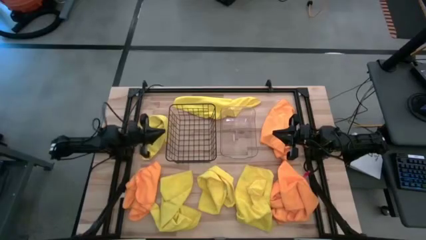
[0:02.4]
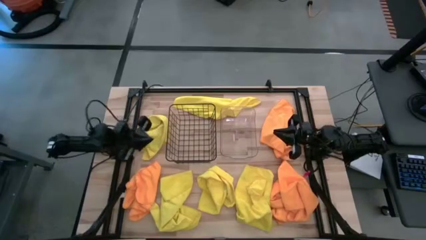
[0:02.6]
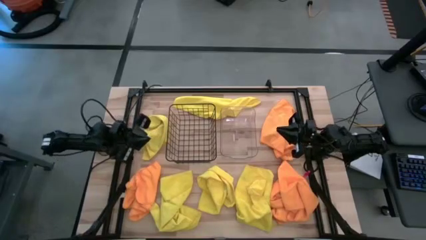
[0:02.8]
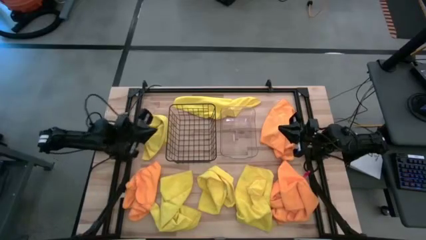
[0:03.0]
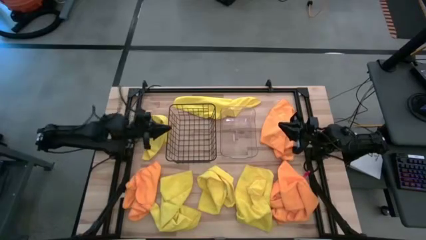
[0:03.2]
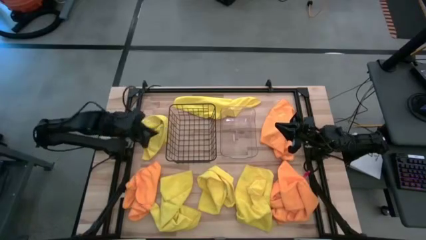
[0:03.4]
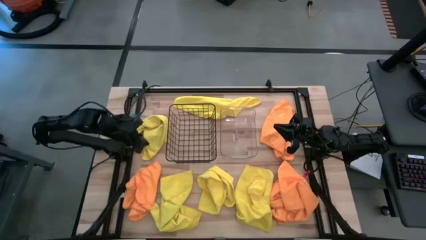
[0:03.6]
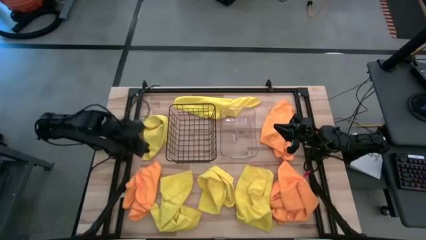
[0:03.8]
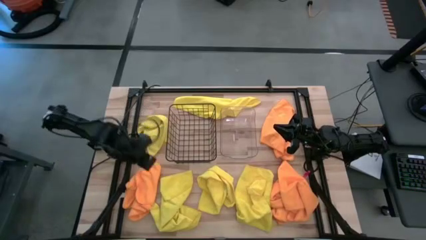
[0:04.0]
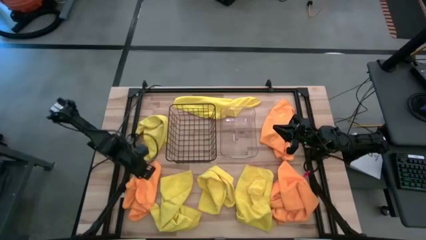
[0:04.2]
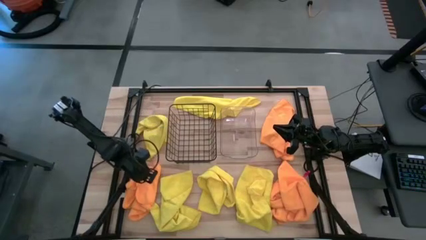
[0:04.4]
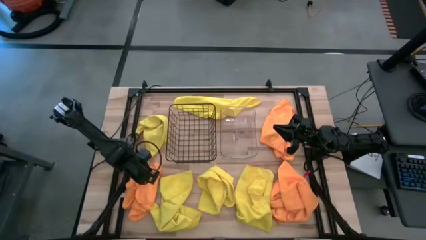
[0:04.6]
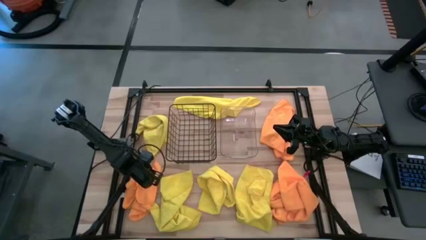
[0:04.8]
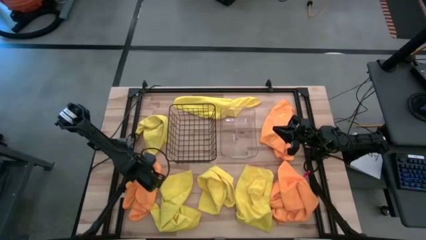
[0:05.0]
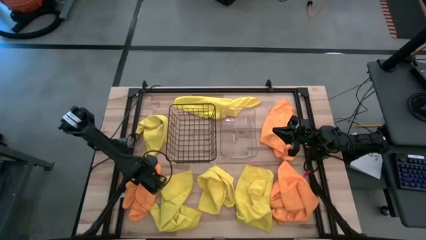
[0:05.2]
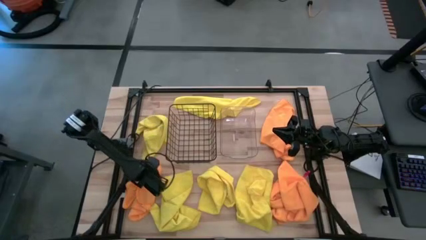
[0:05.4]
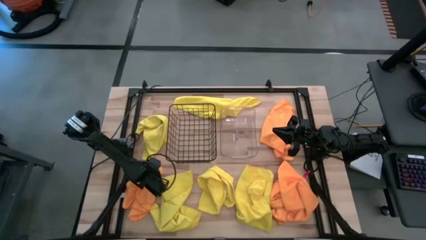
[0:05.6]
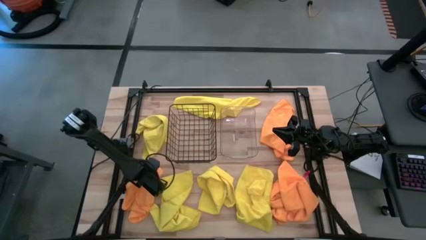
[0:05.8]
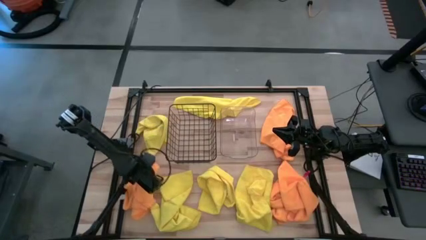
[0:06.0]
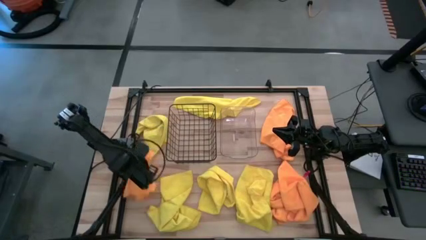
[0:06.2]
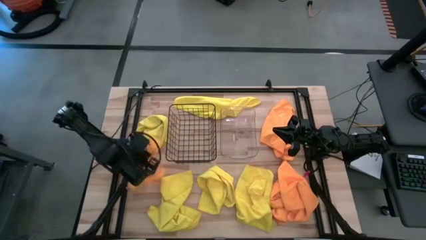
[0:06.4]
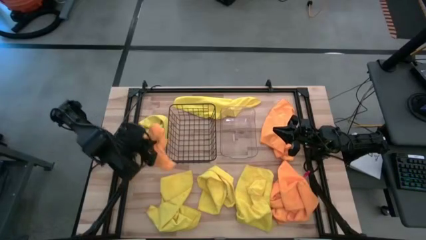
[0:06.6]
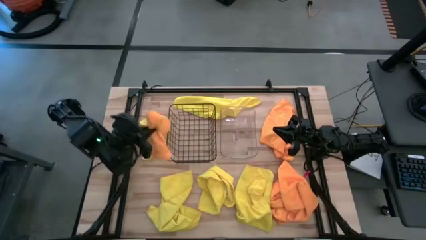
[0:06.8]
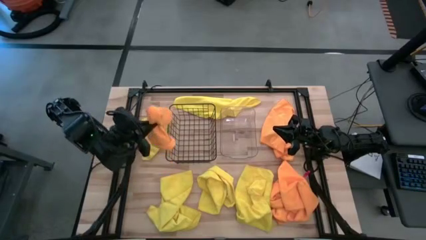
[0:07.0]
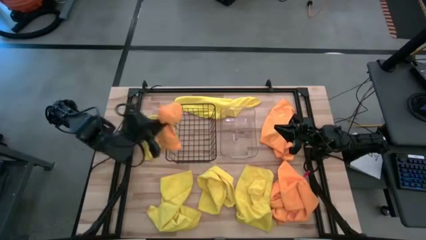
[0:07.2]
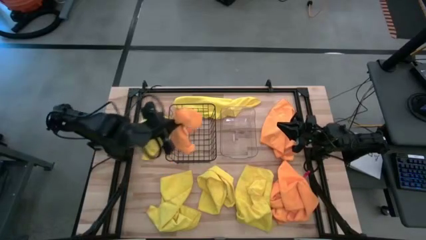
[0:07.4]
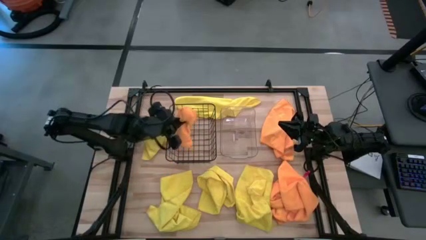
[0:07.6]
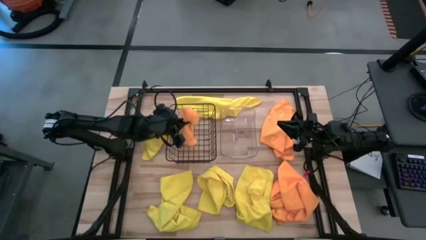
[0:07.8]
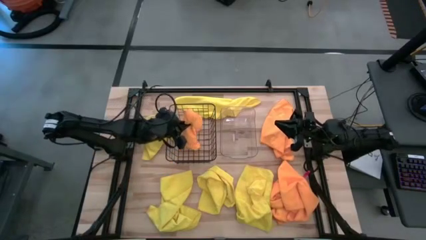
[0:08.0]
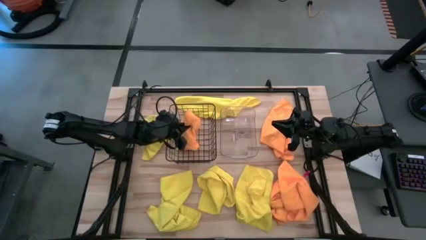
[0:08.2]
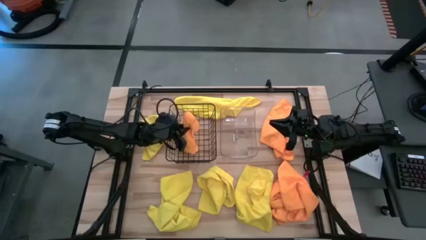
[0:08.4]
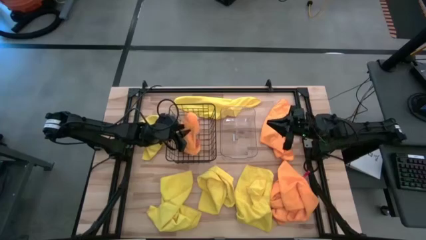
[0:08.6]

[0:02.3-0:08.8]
Task: Sort microfiber towel by color & place in baskets
Put the orange microfiber towel into the wire basket

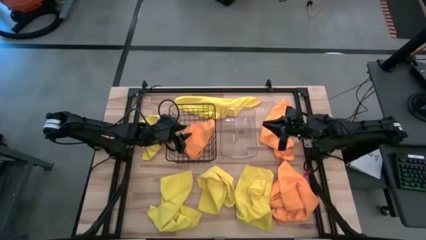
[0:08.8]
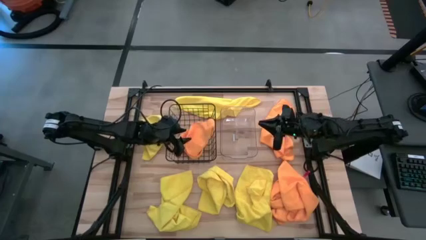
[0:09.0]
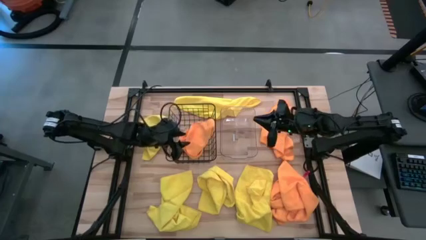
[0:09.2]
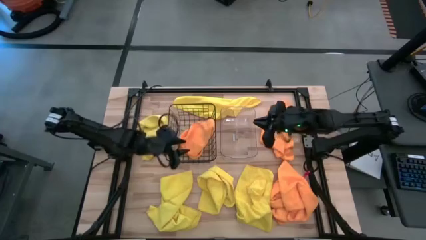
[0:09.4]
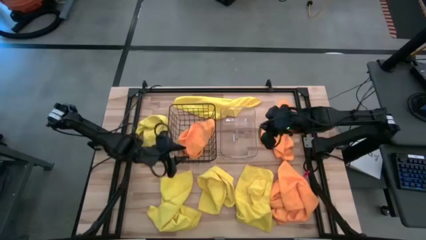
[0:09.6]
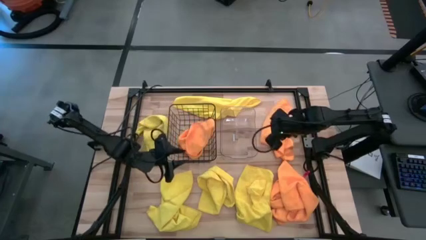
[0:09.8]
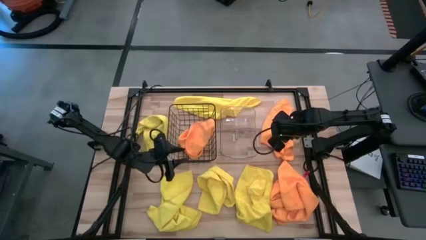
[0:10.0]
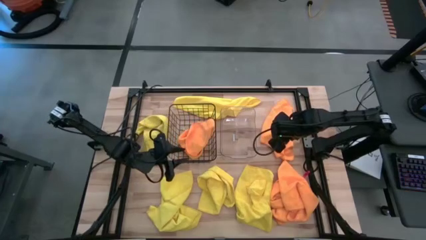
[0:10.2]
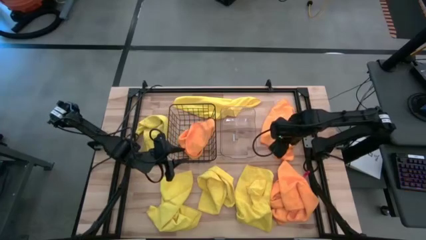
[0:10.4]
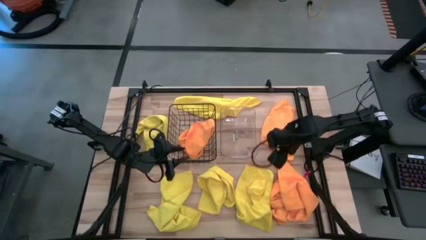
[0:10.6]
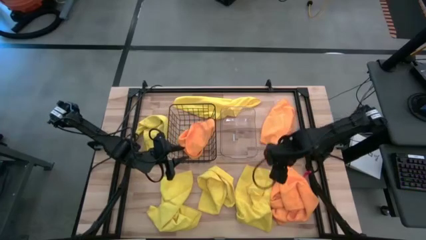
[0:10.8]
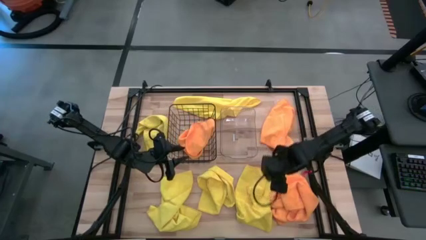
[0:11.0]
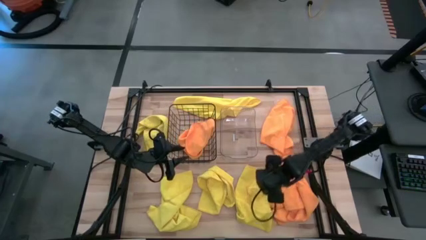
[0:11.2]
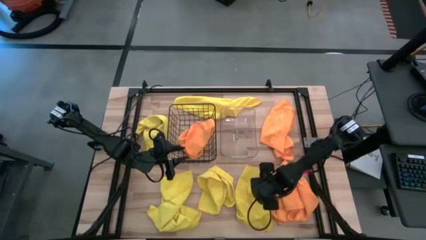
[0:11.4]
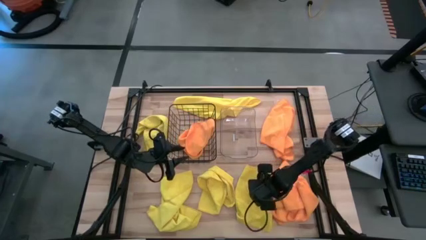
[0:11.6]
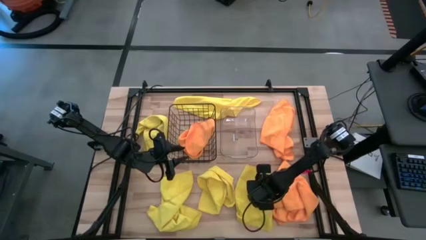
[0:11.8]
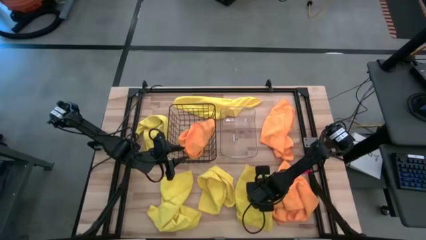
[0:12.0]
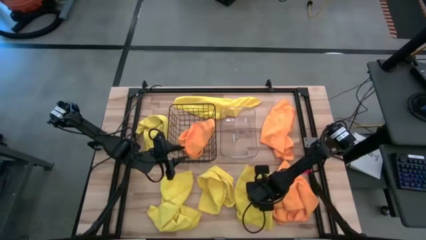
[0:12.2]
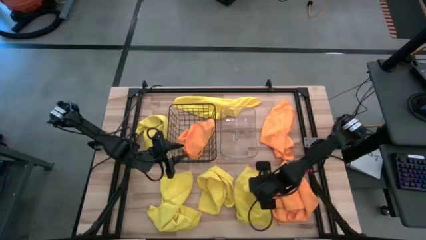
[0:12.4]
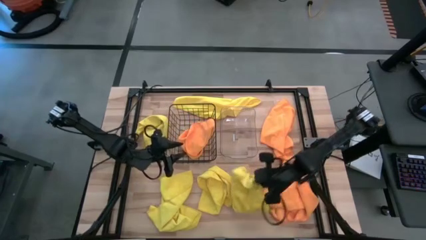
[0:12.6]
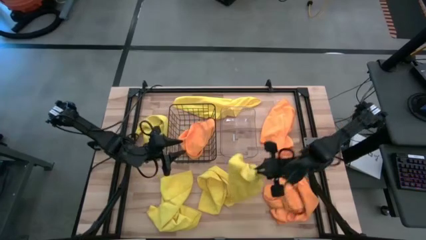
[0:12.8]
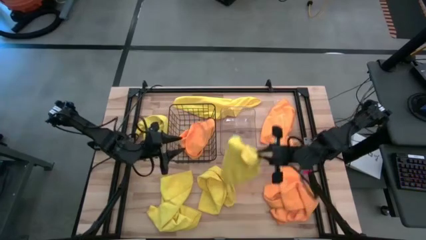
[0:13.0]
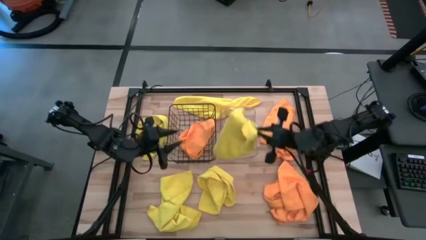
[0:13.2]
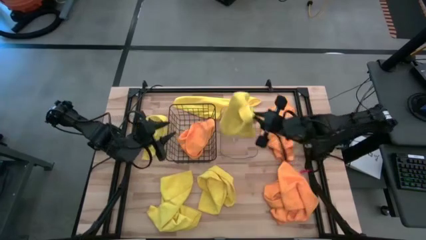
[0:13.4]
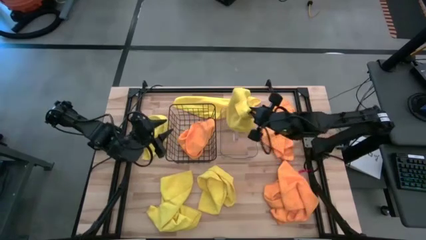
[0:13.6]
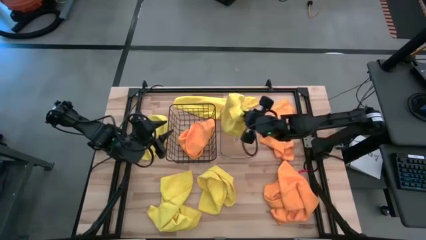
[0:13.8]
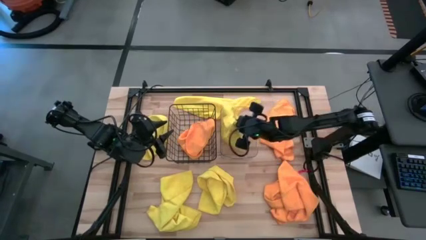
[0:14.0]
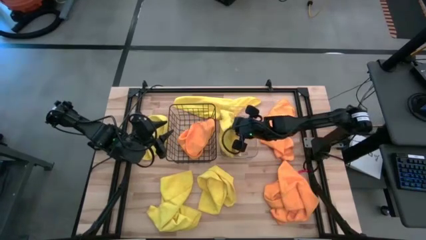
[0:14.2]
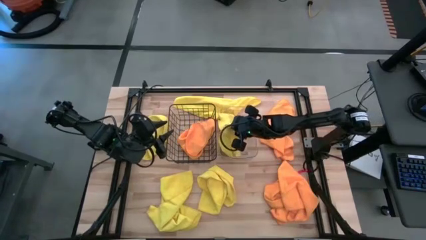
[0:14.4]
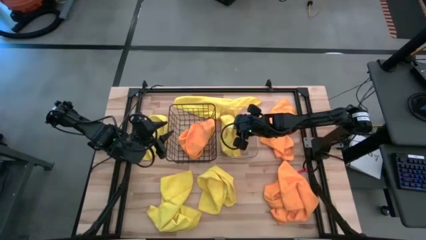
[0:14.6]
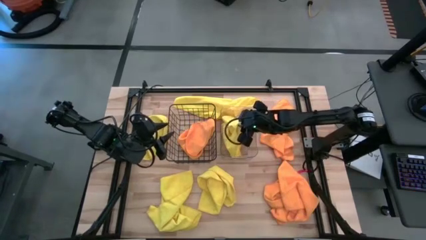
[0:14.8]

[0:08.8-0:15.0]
Put the yellow microfiber towel into the transparent bin

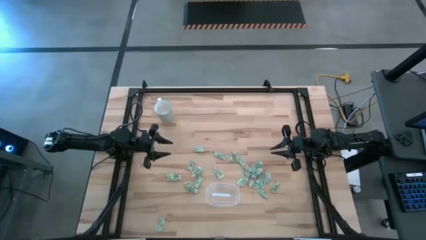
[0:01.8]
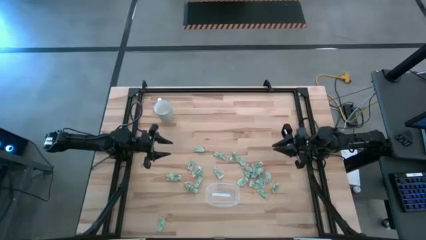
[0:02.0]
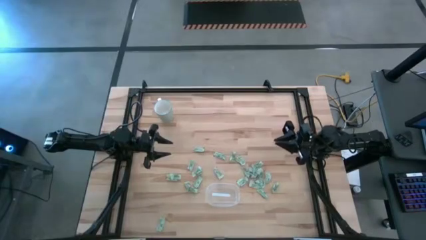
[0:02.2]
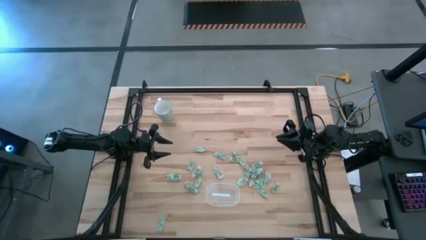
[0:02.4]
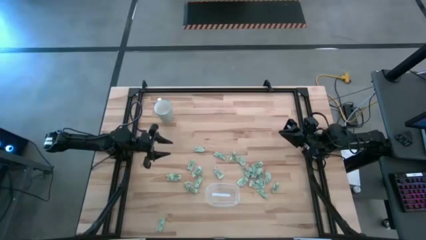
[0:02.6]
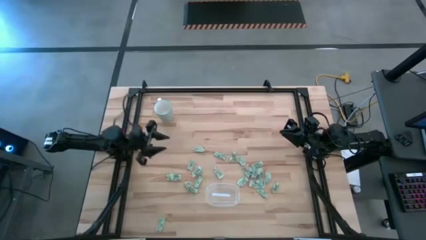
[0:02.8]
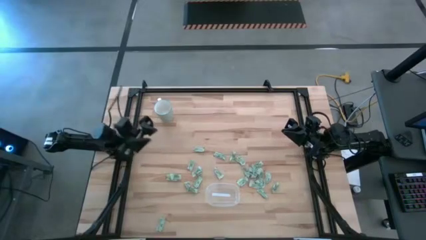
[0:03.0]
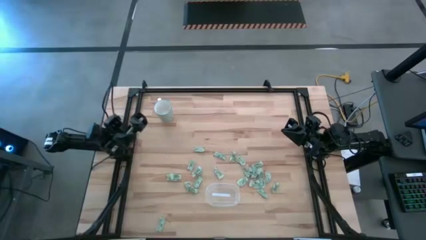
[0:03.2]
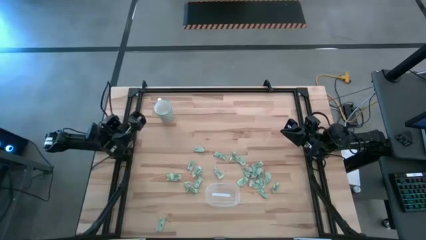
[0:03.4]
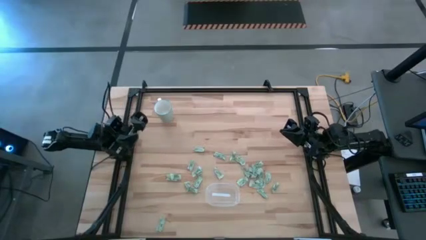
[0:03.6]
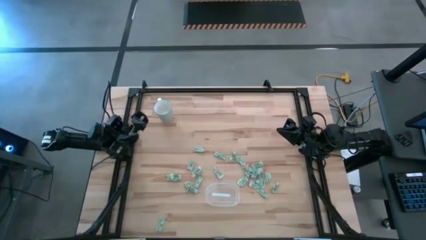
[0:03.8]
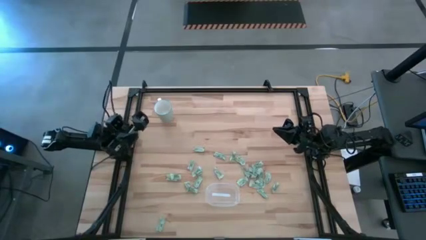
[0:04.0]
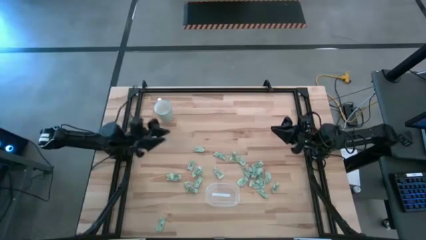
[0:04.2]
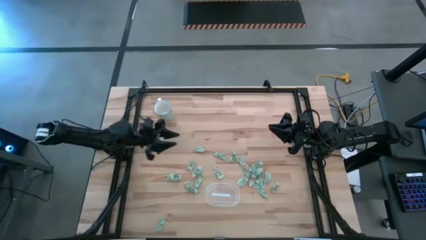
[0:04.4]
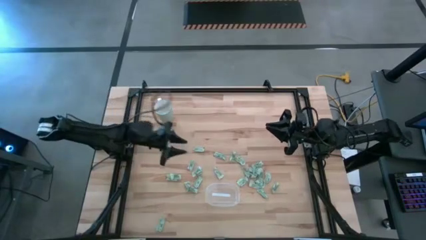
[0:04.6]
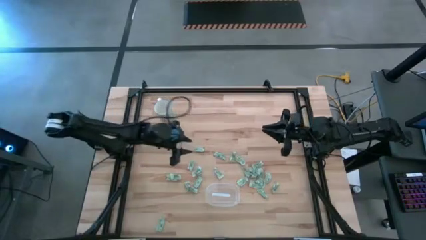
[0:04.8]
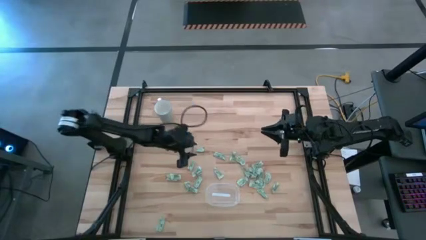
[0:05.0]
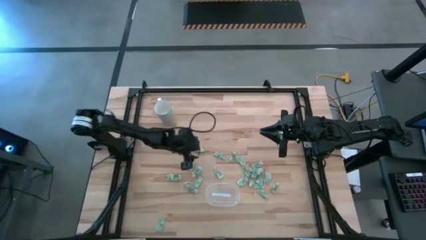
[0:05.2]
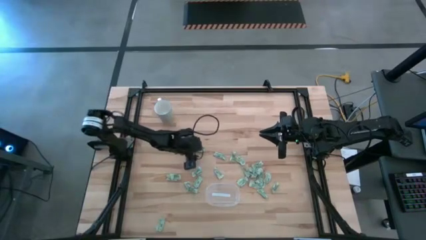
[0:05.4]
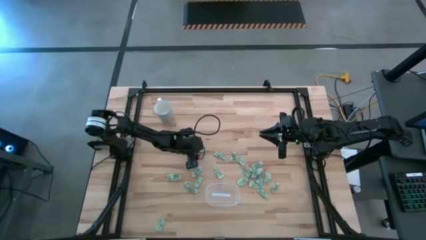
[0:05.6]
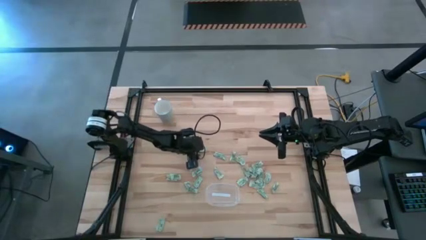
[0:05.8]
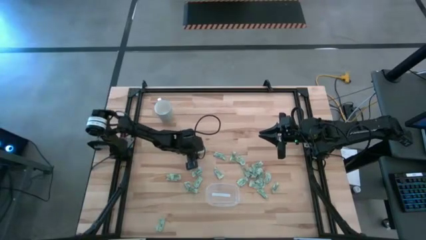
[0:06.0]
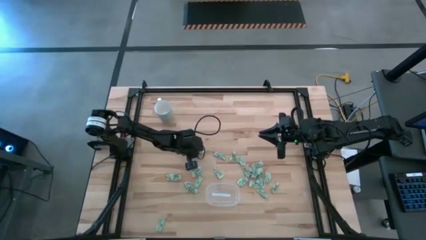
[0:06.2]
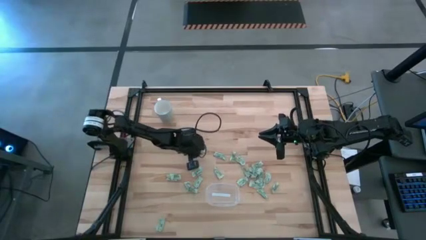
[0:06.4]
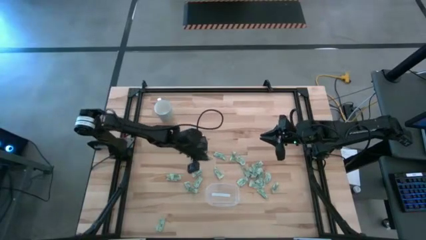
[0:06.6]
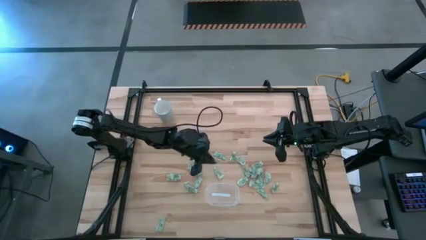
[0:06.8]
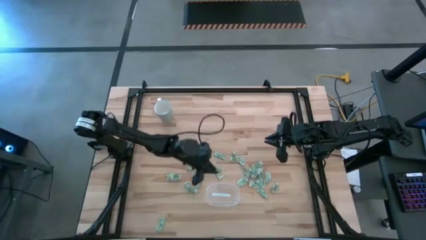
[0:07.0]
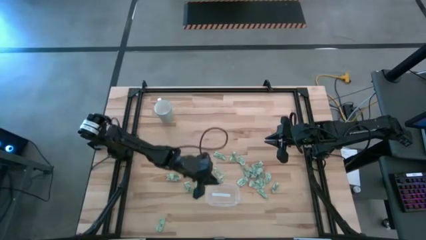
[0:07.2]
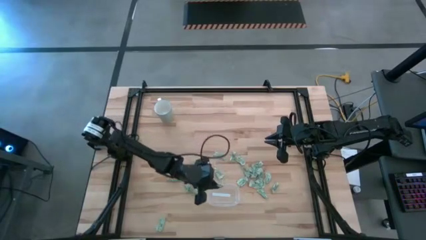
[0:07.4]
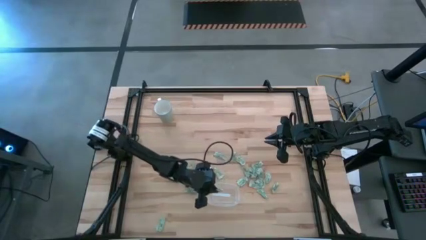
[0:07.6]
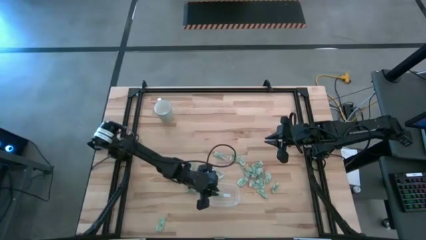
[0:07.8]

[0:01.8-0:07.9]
Task: Pick and place Stevia / Truvia into bins
Put the stevia packet into the transparent container
